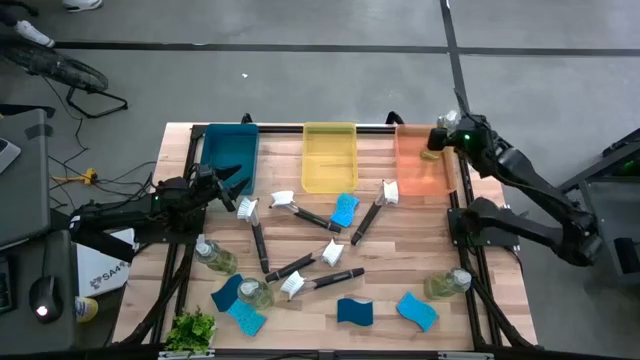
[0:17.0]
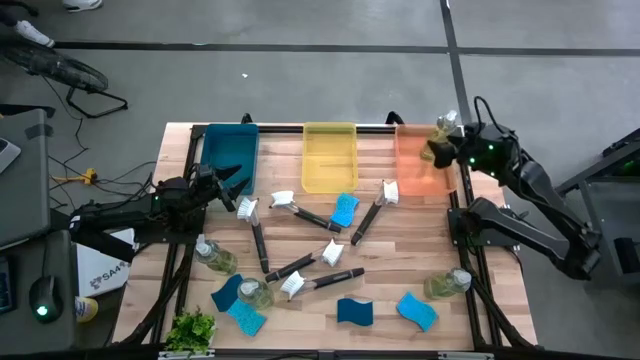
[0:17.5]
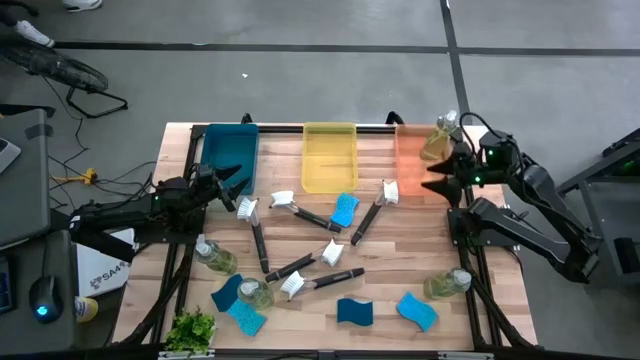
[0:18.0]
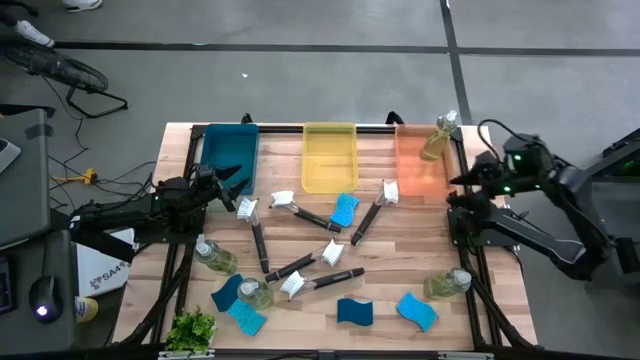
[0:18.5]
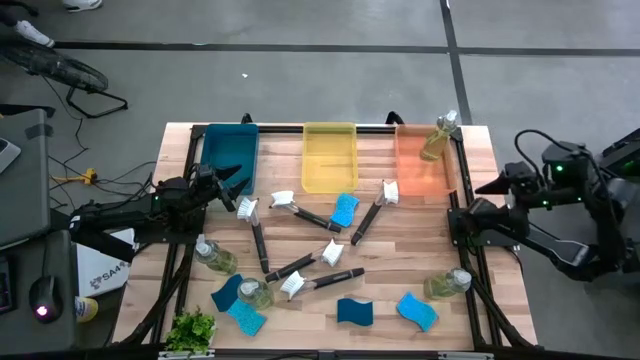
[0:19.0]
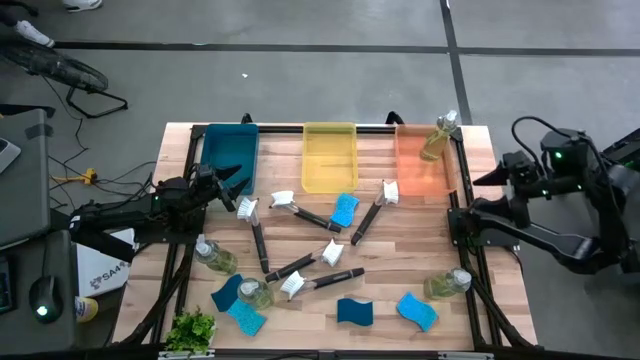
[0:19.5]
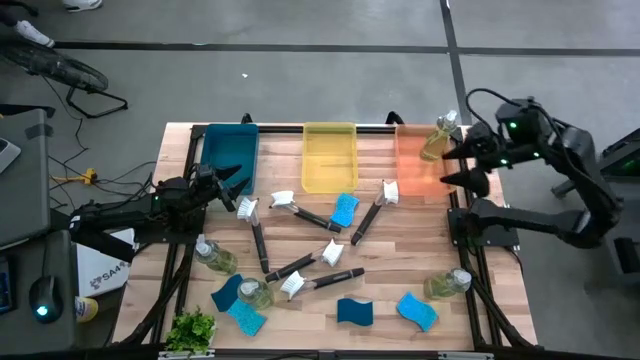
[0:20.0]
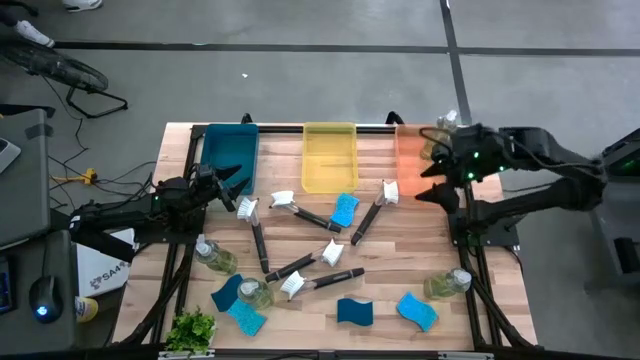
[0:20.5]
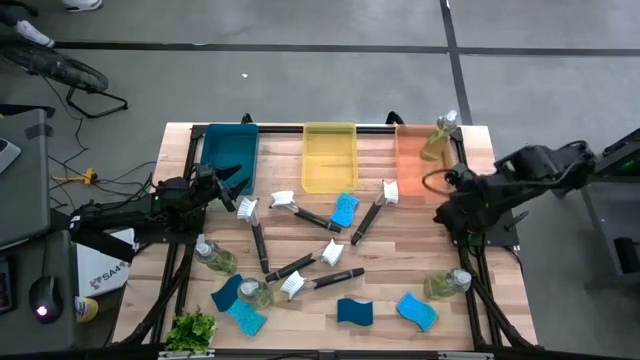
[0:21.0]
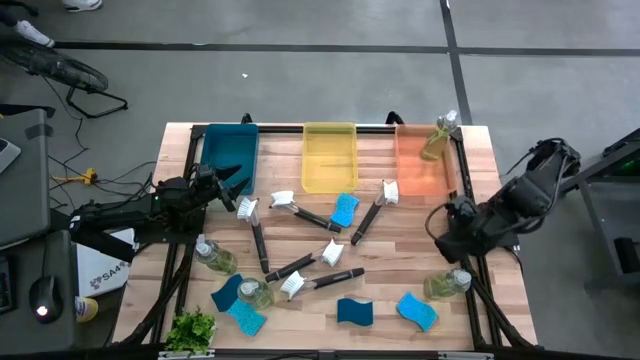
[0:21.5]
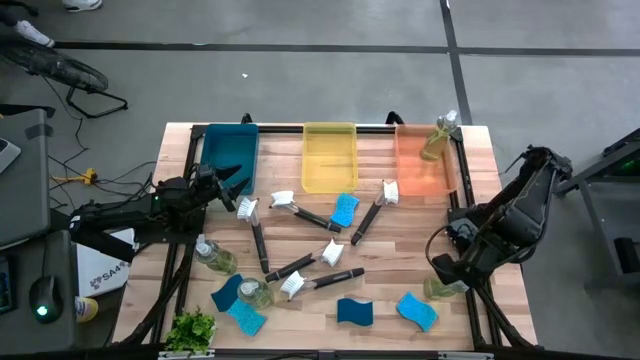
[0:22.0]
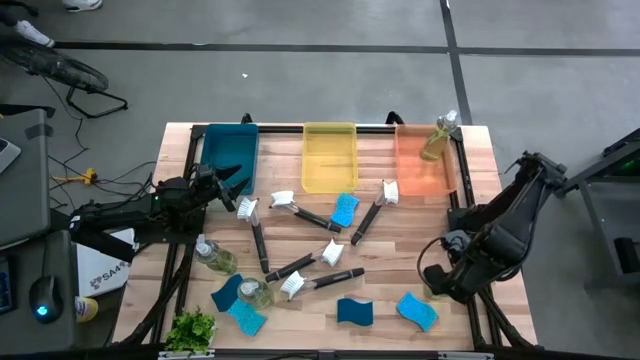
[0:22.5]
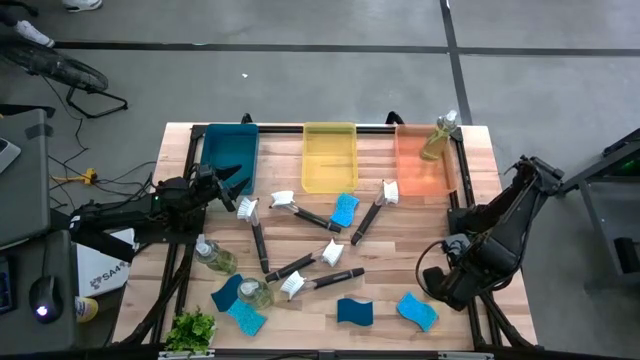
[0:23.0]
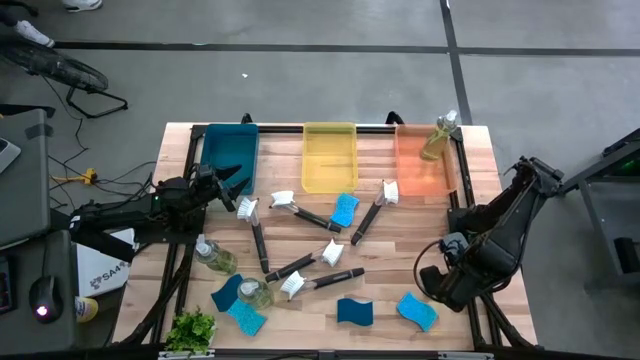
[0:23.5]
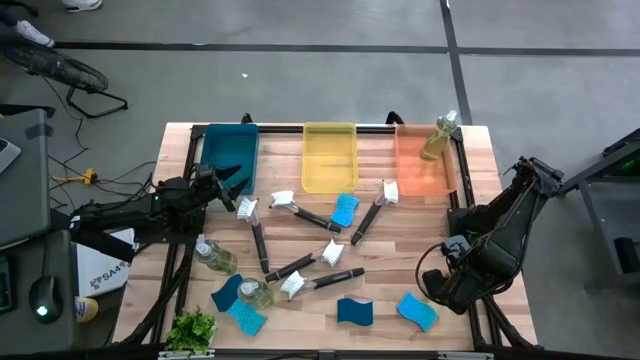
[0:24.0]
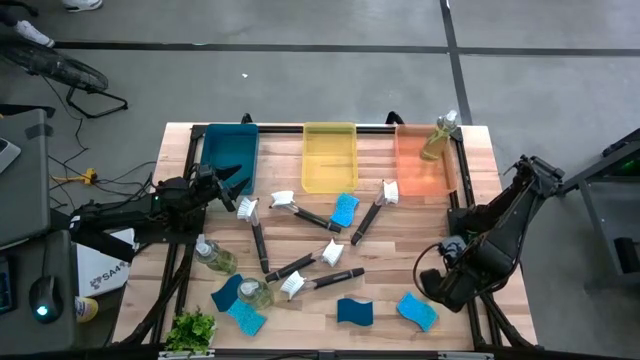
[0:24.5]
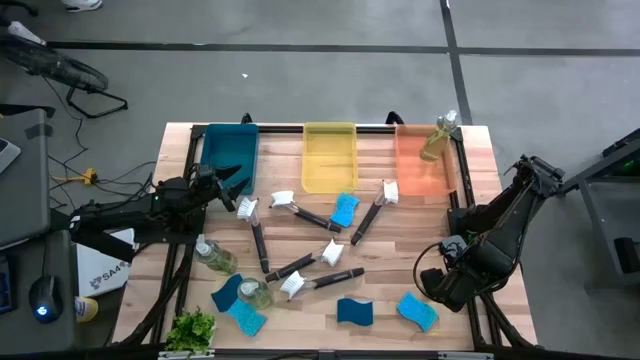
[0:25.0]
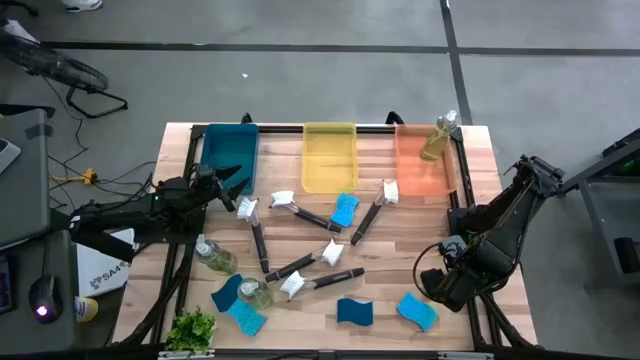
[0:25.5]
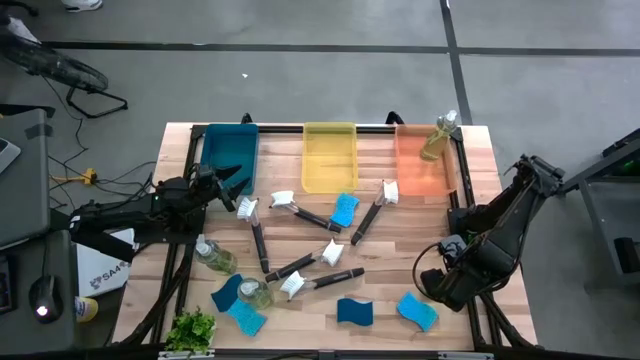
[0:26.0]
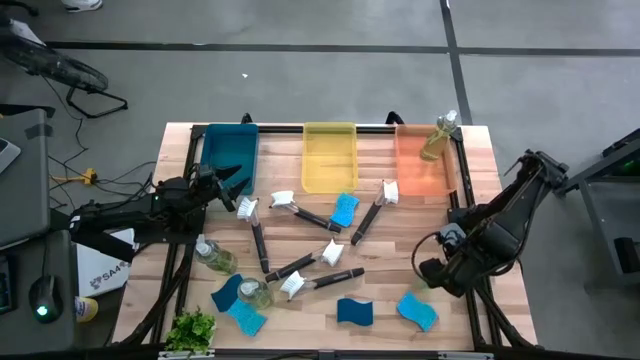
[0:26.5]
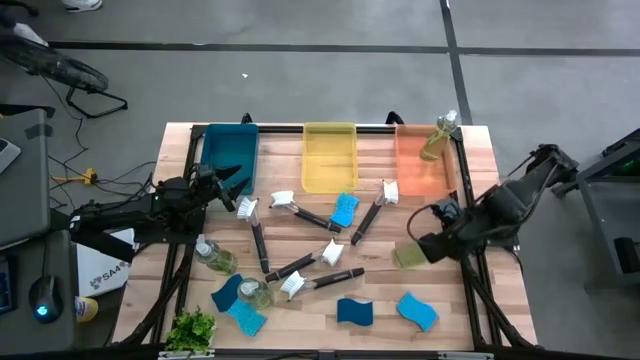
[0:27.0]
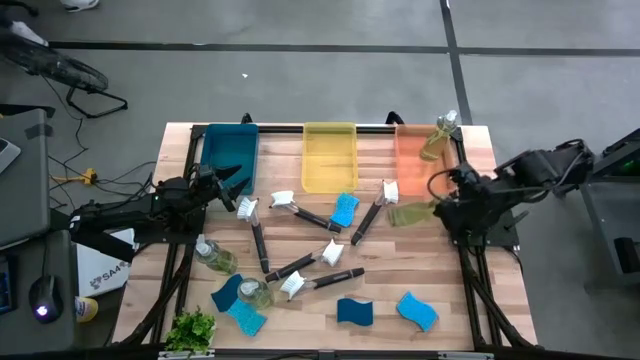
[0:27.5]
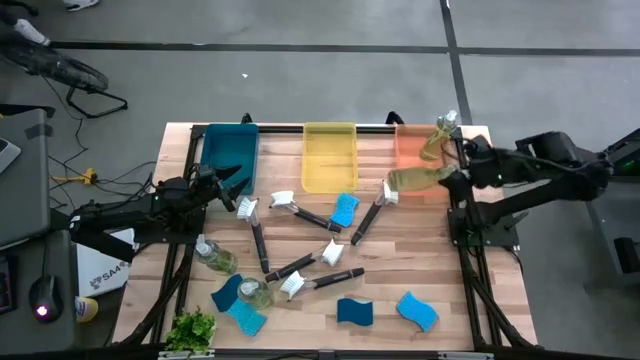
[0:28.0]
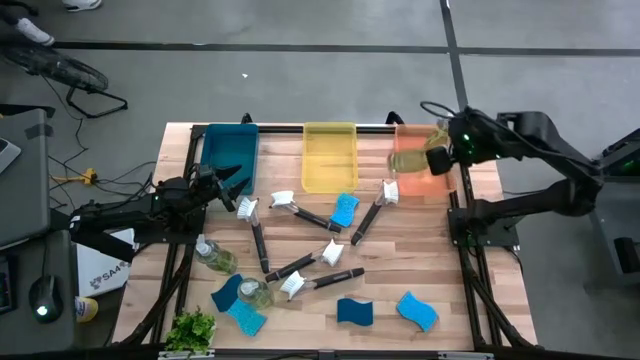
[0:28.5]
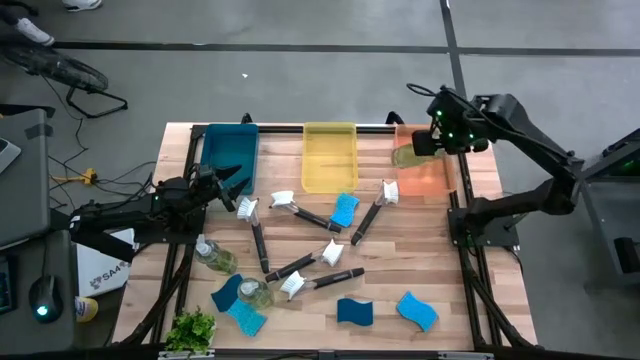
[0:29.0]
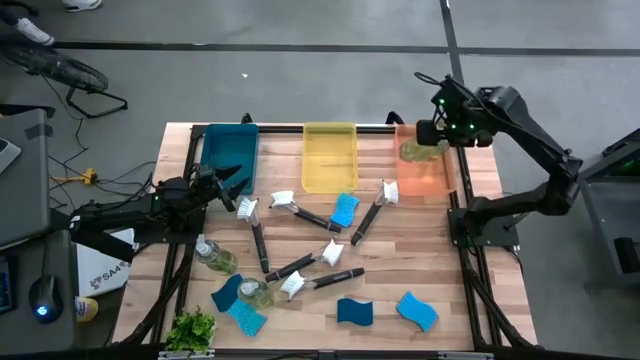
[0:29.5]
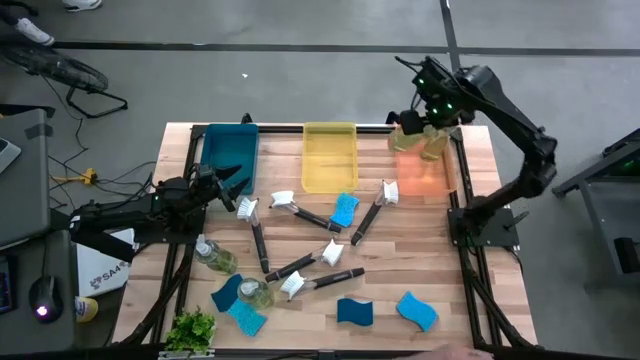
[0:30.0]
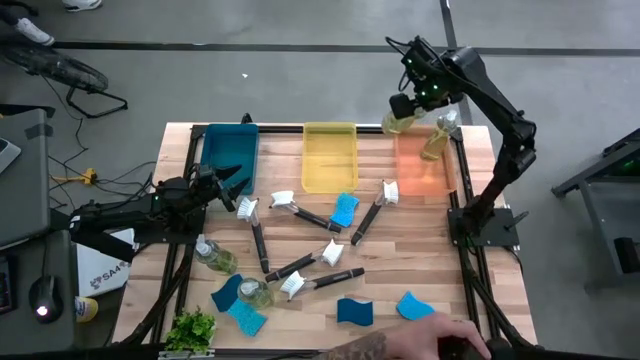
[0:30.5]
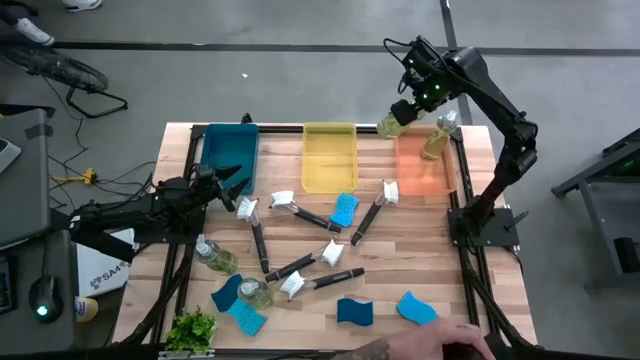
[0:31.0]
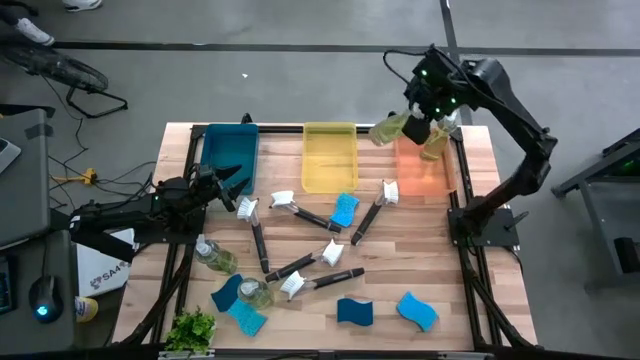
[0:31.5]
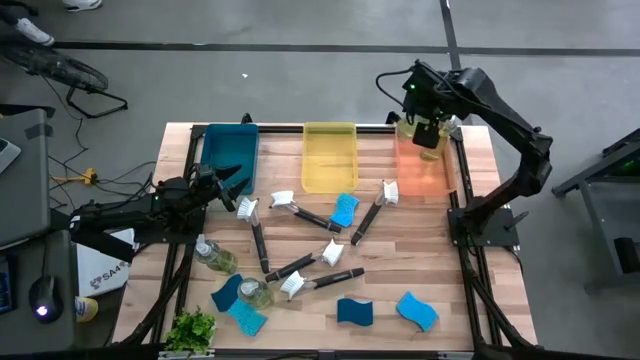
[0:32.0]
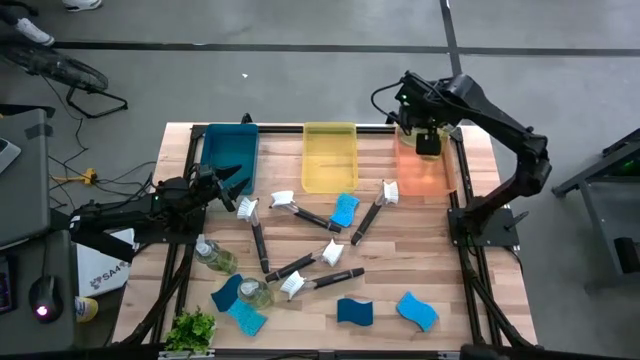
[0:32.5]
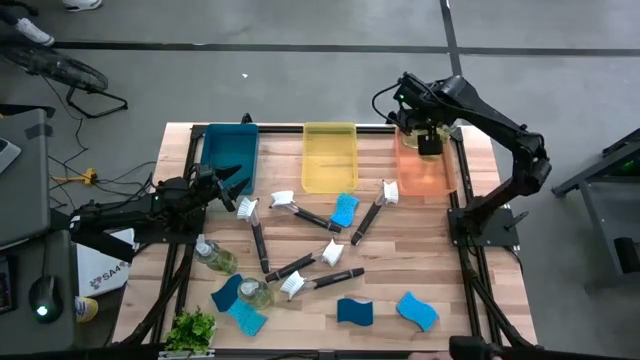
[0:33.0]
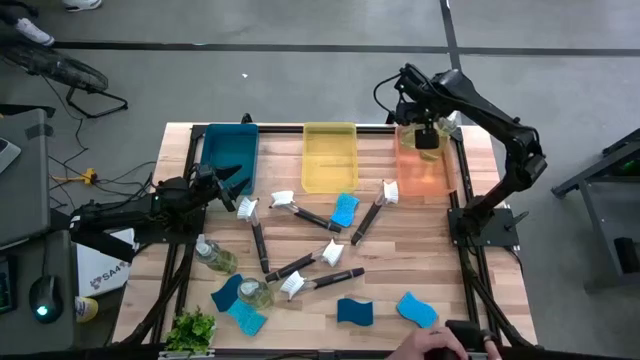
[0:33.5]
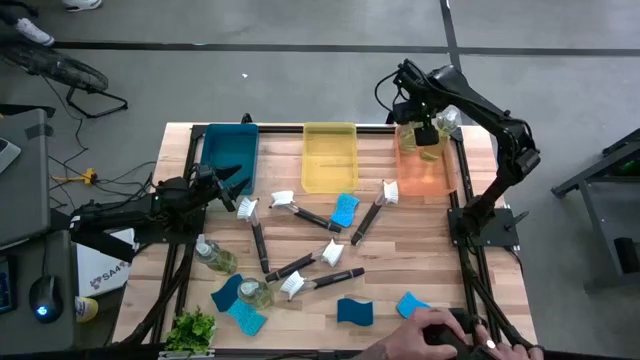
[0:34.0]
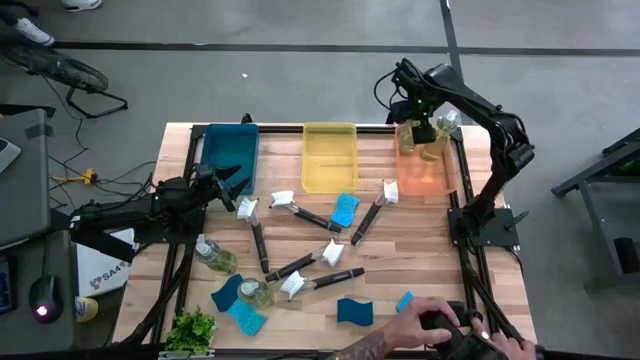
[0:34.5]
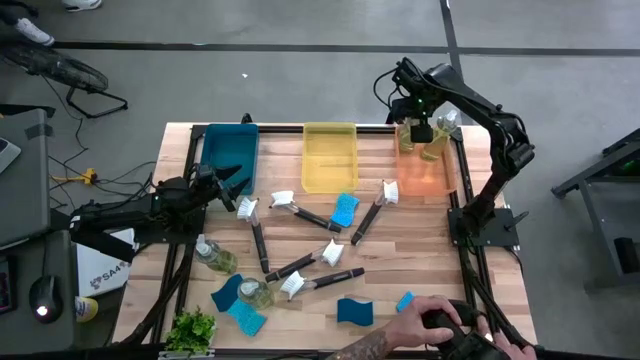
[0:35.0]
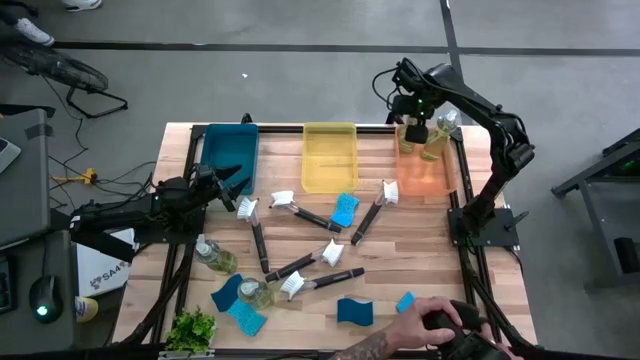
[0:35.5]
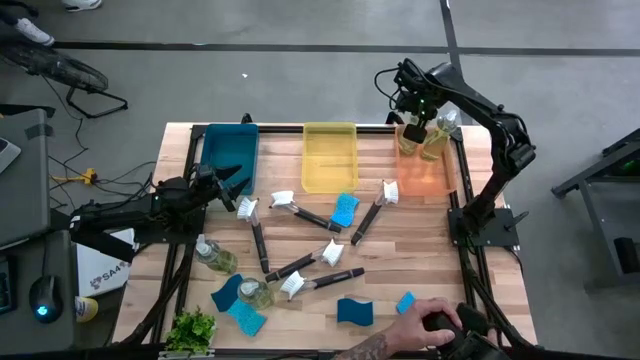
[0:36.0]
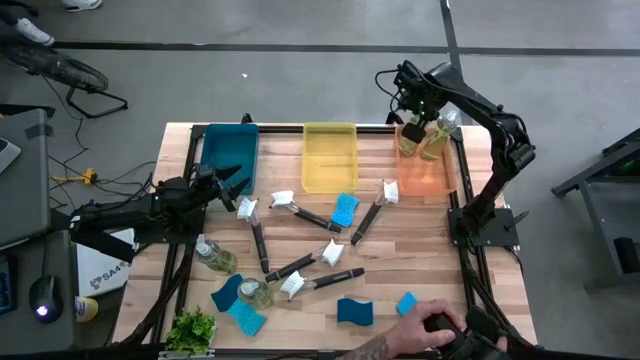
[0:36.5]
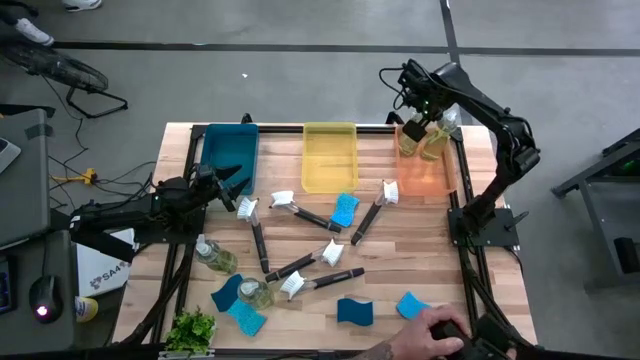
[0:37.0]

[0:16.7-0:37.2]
Task: Pick & Place Kitchen Sink Supplies
Put the green dishwashing liquid dispenser into the orange bin
